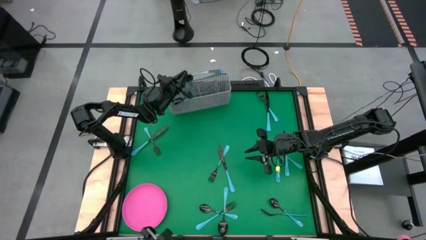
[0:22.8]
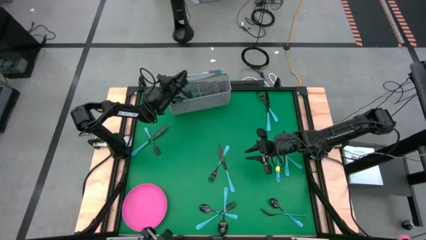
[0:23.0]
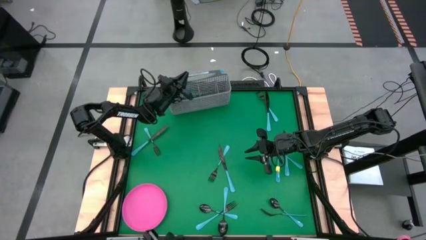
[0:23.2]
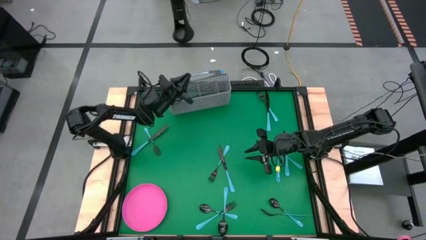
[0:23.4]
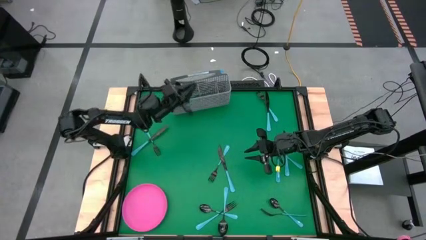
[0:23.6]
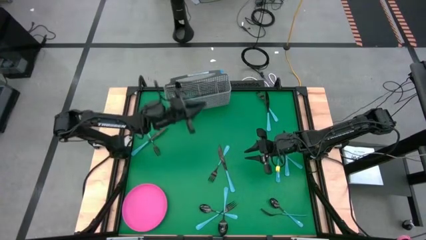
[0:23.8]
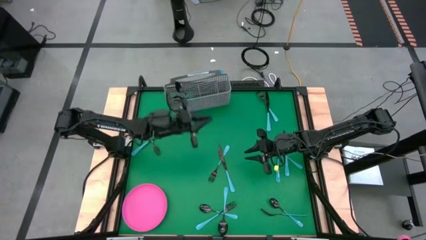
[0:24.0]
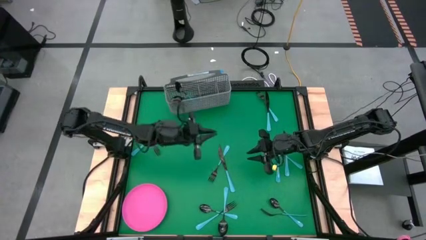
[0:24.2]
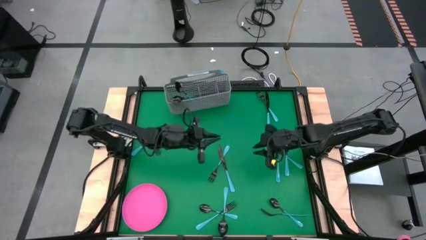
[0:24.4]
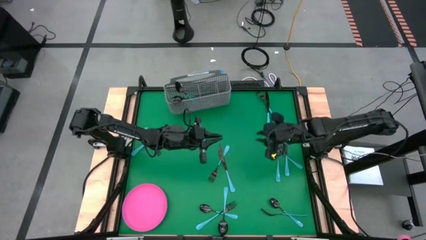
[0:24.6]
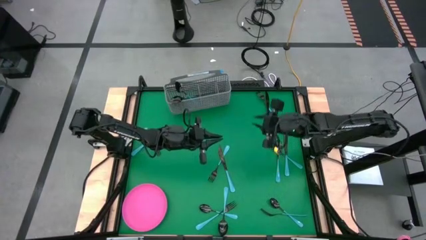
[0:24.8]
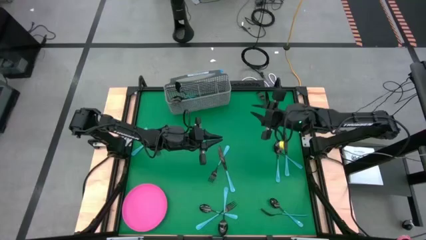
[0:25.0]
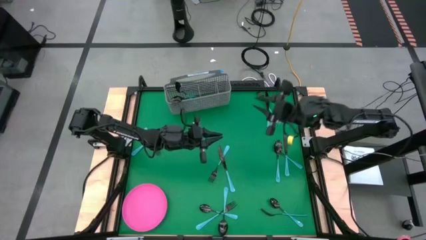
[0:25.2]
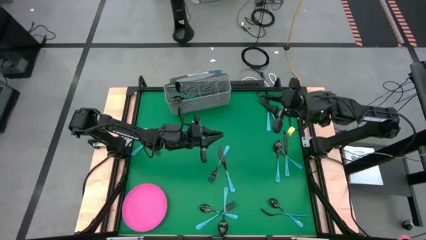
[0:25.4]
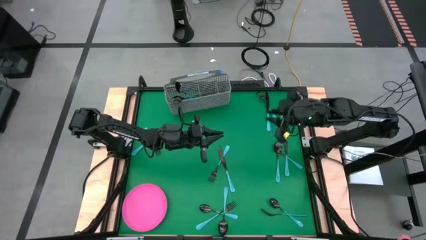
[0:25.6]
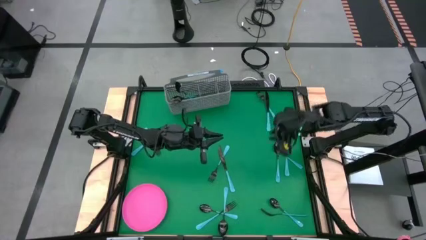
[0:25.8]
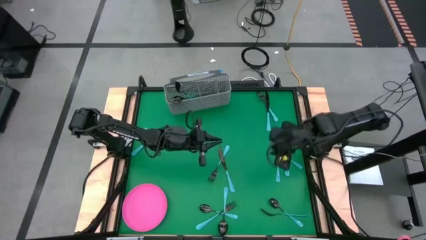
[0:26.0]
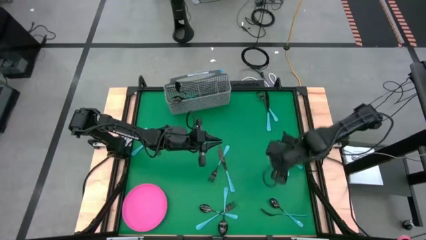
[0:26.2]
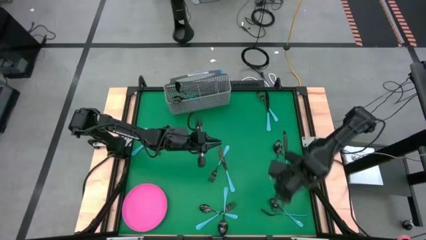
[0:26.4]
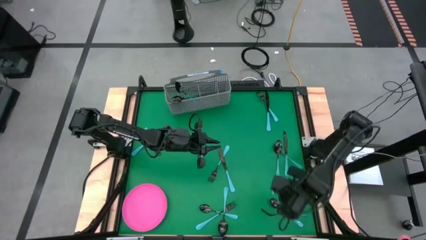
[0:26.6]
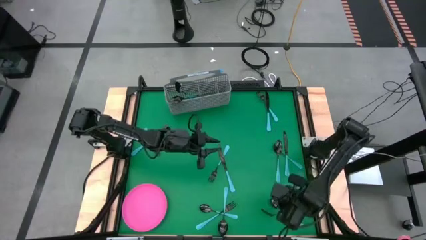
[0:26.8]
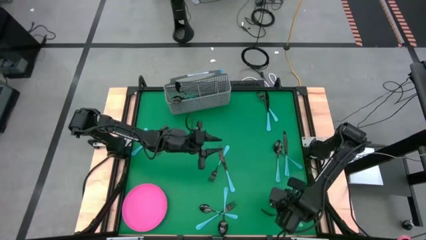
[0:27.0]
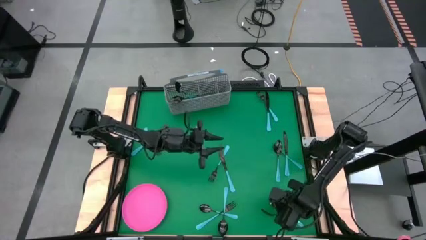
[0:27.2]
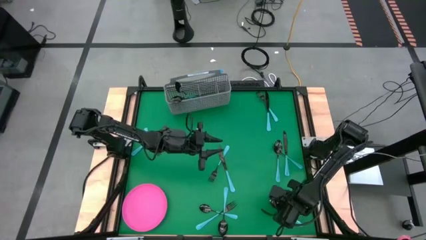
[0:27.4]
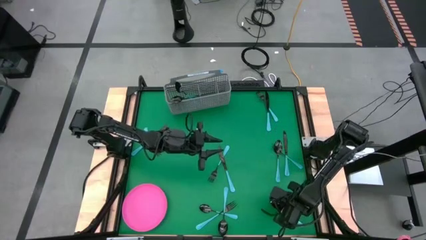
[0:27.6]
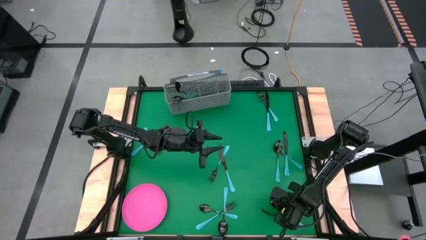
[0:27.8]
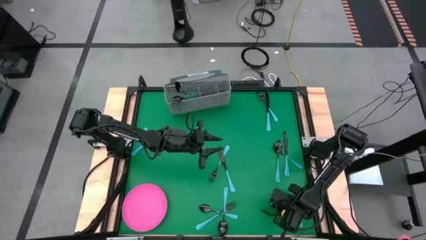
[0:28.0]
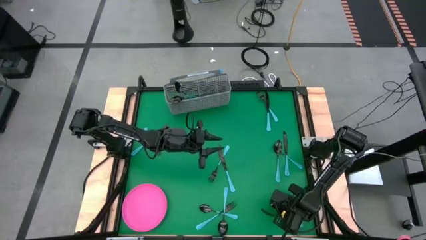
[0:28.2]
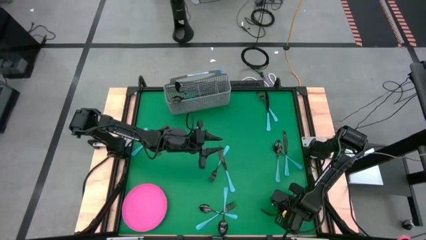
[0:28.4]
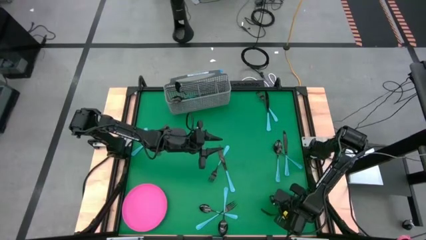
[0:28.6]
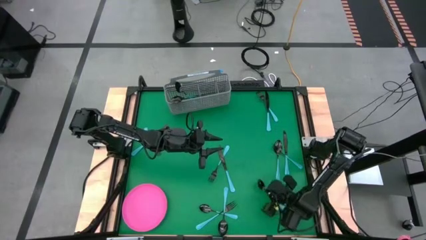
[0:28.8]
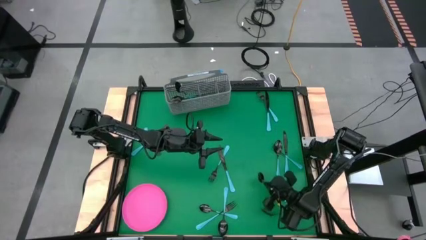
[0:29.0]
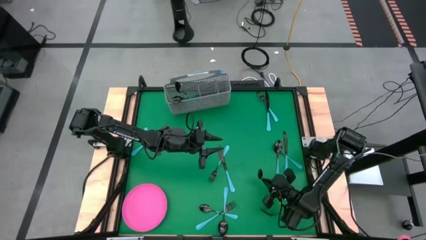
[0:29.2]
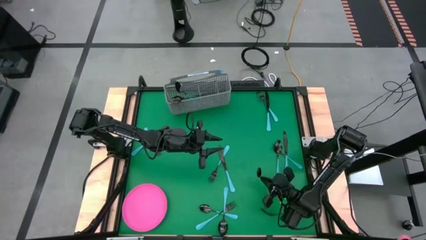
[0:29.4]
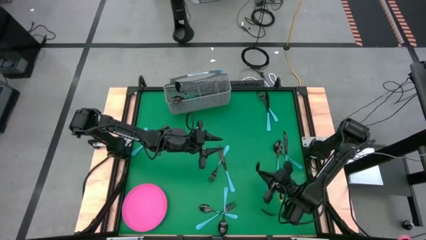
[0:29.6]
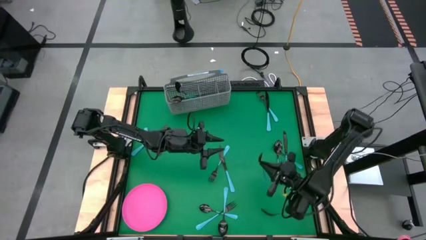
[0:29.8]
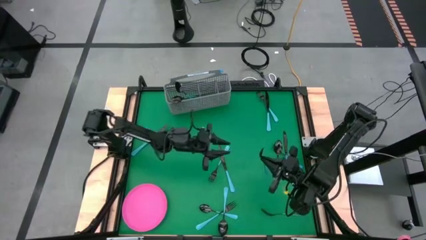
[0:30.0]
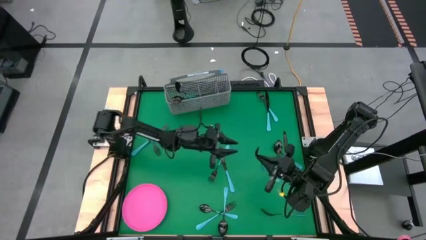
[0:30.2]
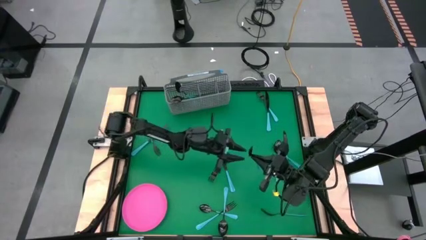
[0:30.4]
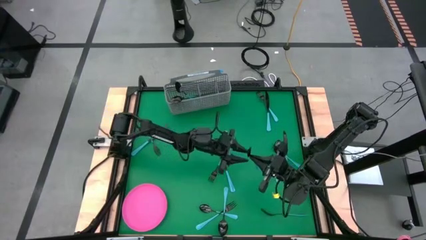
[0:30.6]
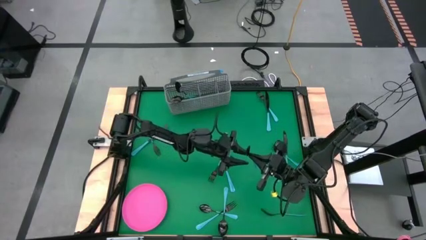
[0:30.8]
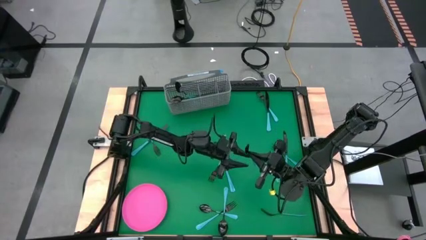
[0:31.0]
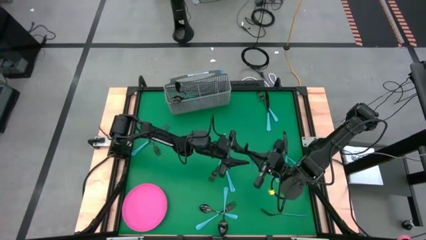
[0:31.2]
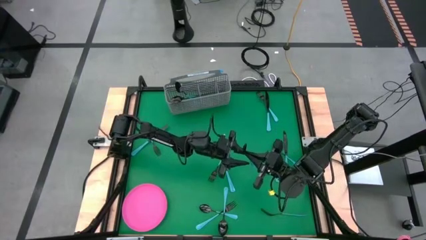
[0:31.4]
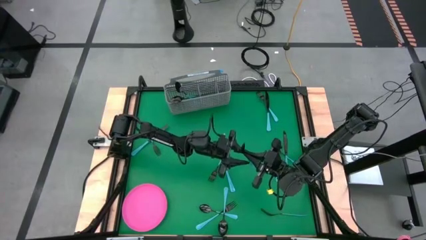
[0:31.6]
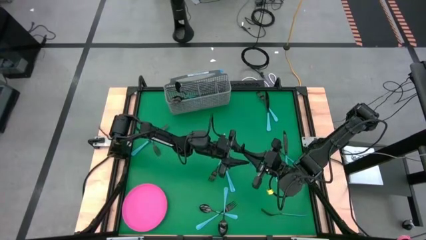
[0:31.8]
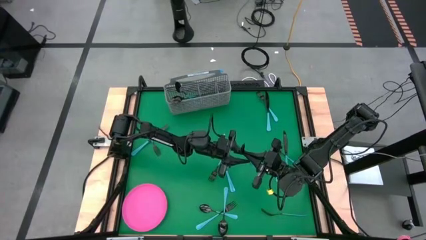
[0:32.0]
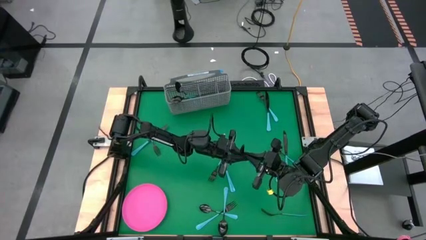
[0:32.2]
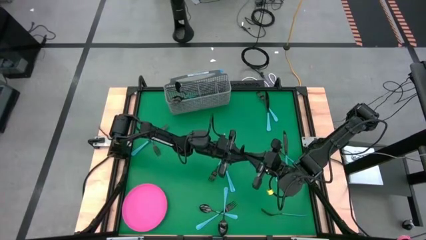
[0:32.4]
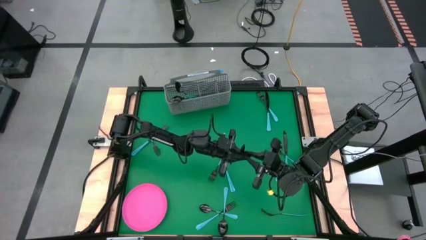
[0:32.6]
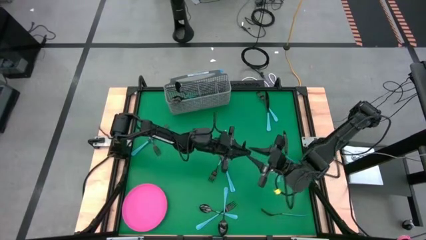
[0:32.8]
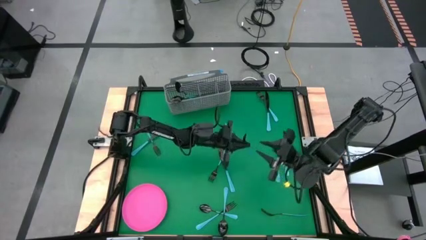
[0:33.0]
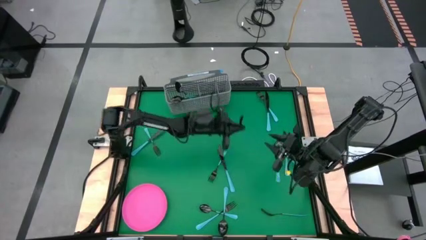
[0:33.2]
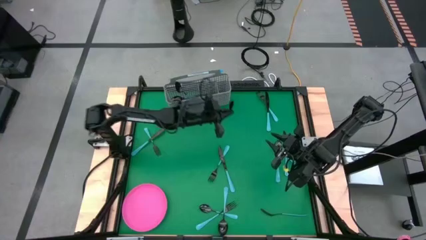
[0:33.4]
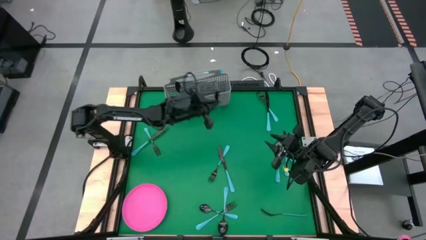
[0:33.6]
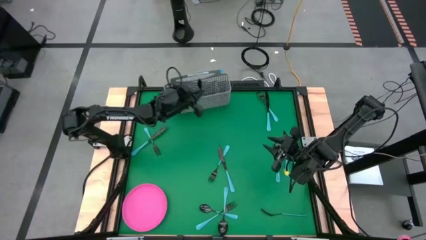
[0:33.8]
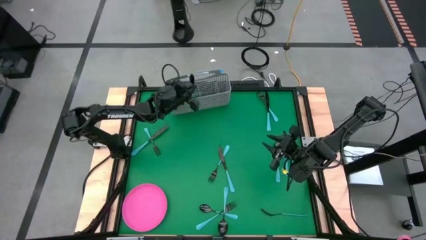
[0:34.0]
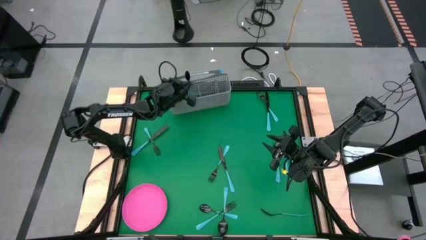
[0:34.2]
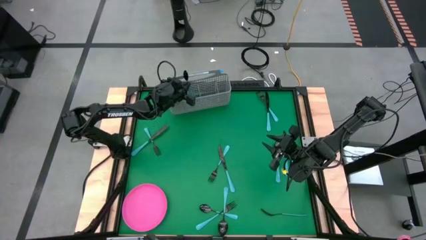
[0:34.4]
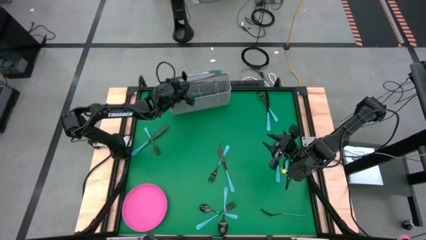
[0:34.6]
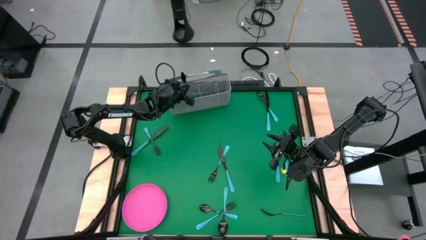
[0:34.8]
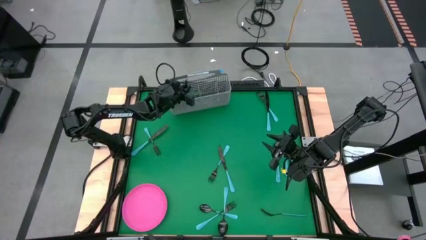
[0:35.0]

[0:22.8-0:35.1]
Task: Sort silverware
Put the blue spoon into the silverware basket

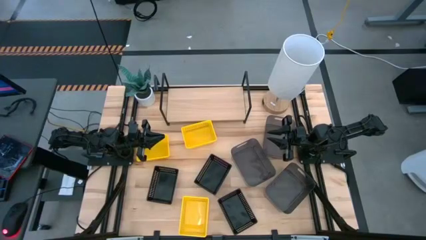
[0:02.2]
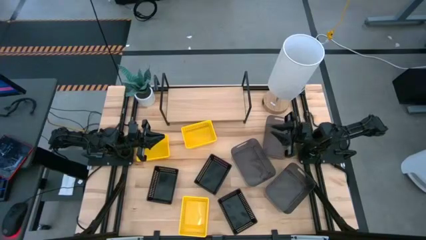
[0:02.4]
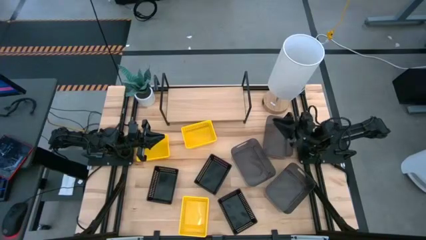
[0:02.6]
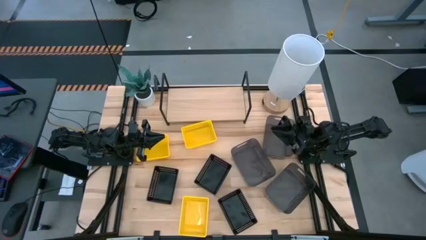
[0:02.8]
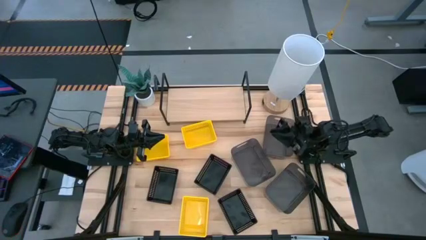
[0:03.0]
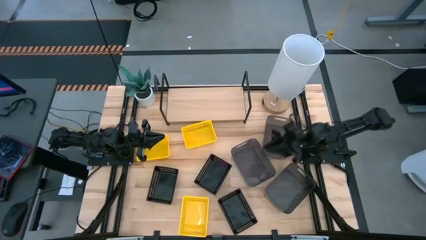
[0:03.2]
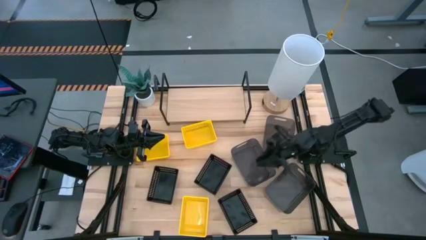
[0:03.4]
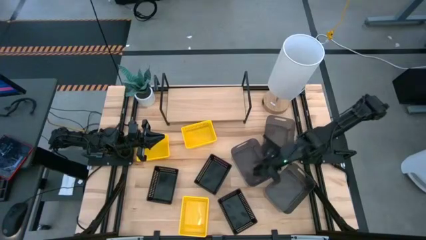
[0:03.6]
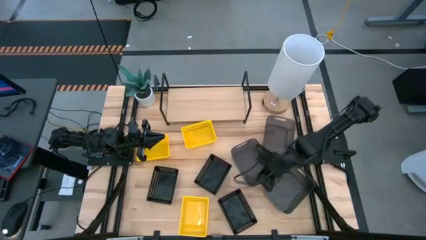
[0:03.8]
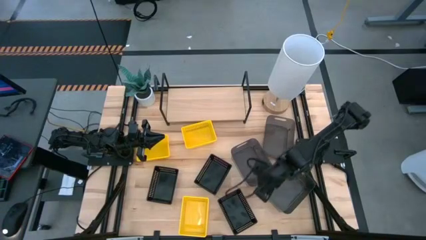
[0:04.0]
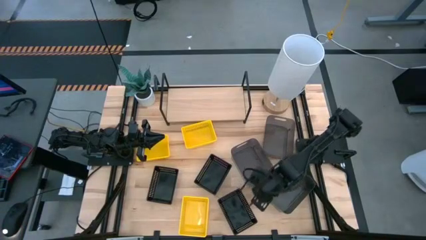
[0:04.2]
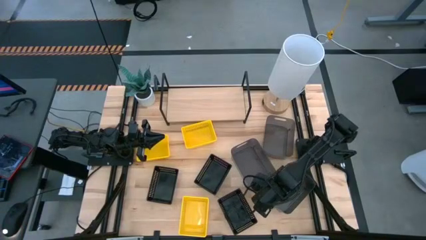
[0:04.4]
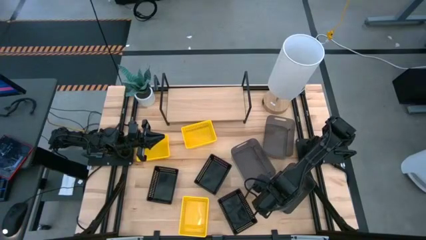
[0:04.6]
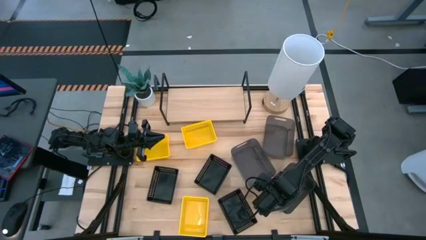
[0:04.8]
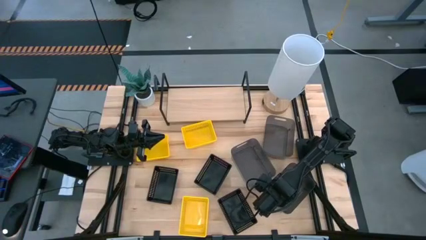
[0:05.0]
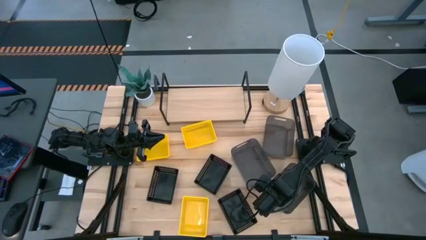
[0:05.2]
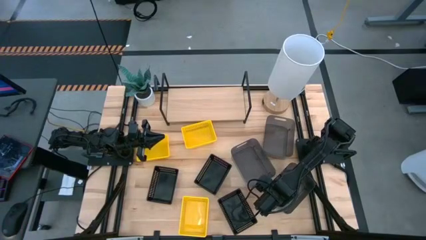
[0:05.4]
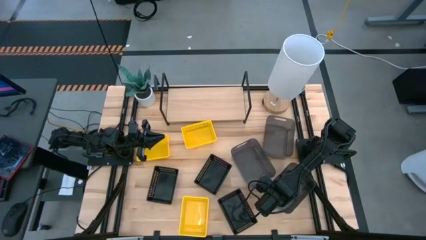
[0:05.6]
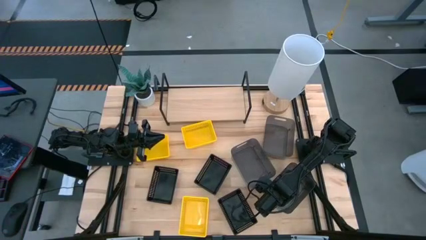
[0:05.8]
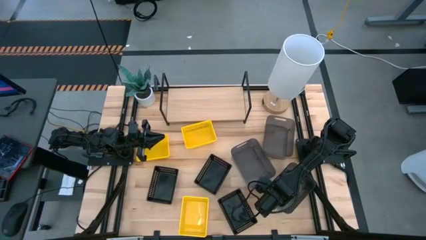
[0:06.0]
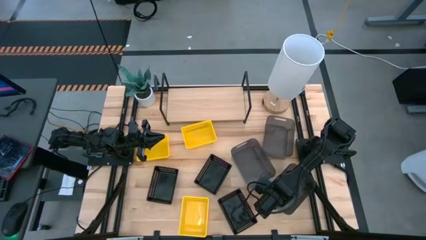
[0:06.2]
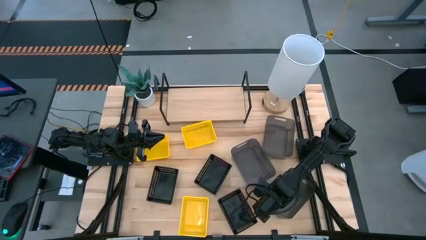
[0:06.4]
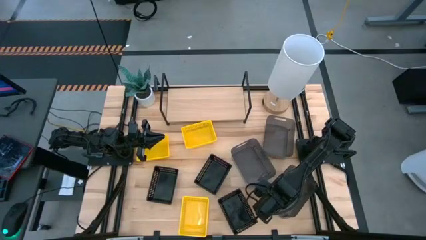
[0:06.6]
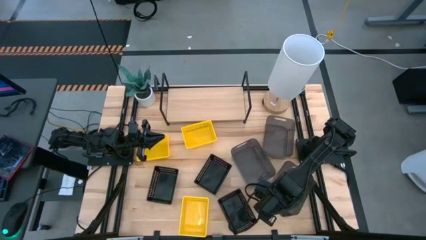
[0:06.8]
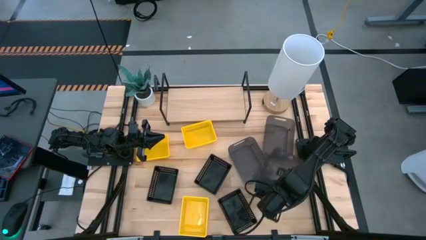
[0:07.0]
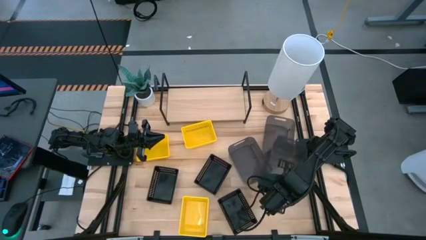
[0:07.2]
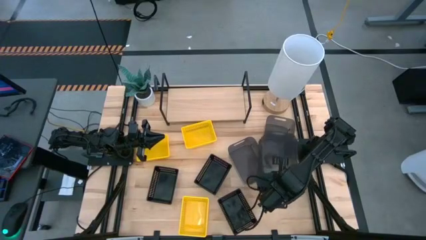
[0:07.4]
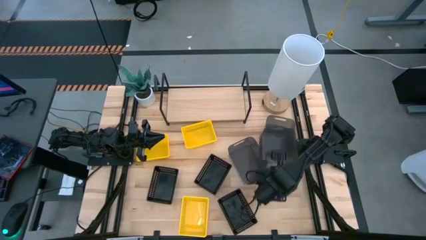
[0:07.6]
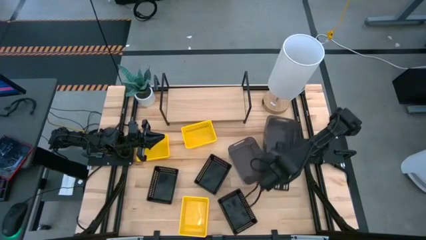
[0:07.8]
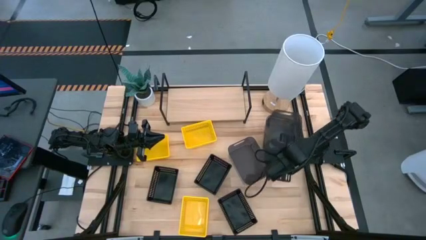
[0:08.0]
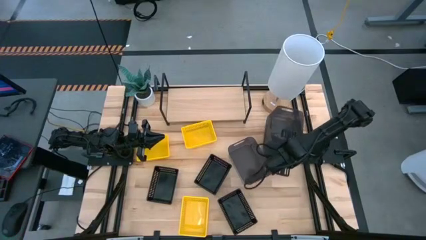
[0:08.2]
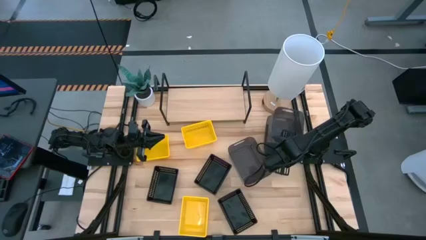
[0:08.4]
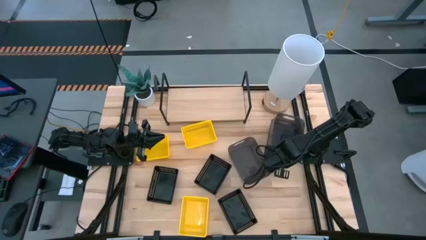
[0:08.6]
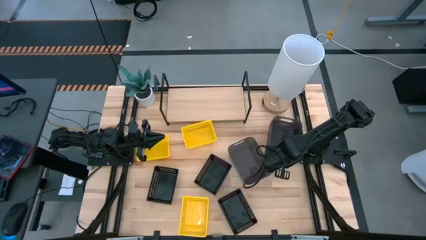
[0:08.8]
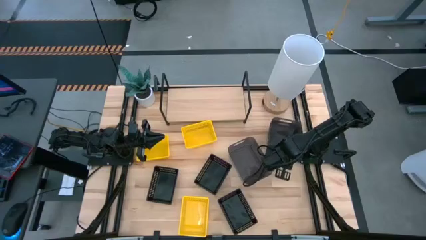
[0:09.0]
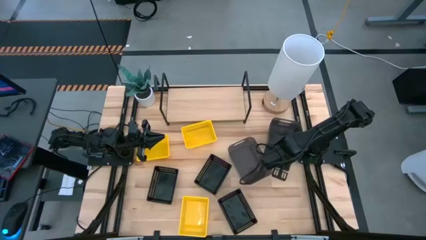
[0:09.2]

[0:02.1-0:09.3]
Task: Stack baskets on shelf by color
Stack the bottom gray bin on the top gray bin
